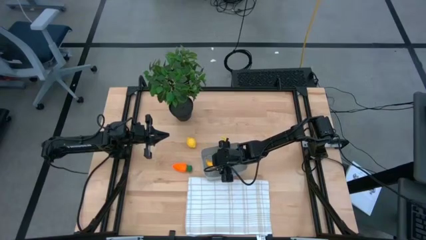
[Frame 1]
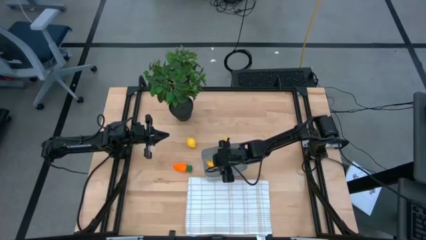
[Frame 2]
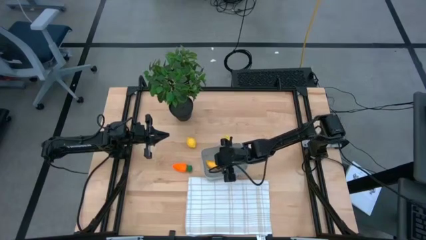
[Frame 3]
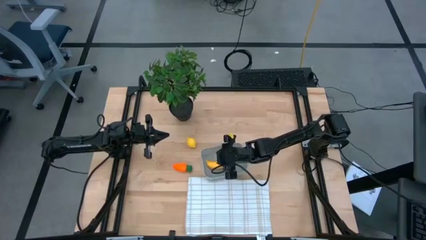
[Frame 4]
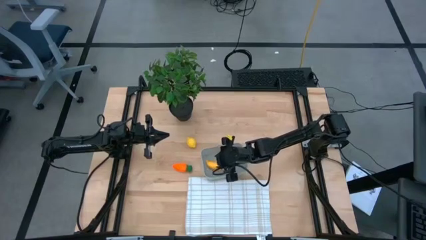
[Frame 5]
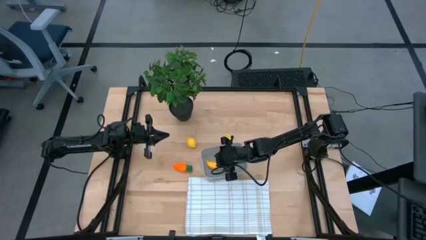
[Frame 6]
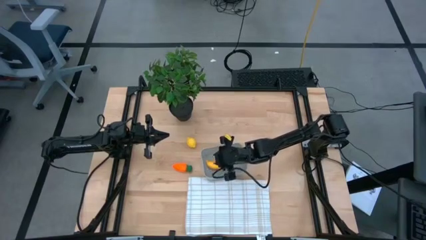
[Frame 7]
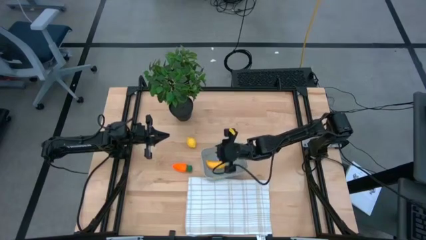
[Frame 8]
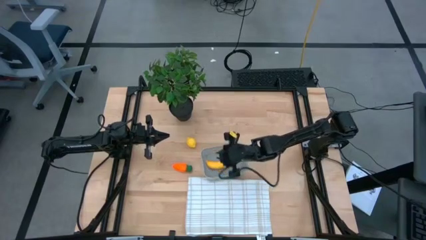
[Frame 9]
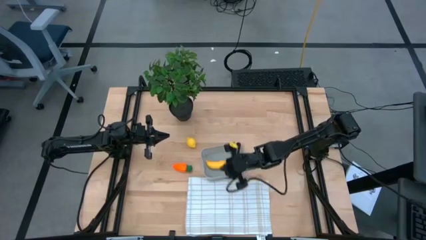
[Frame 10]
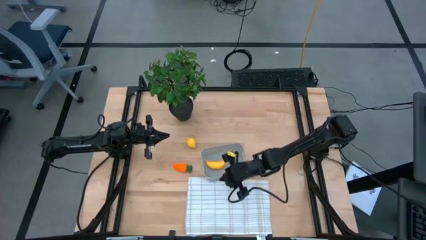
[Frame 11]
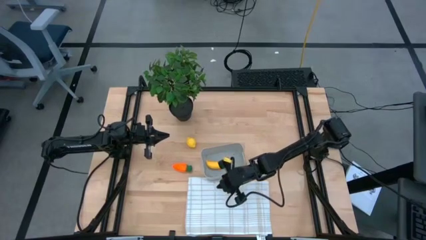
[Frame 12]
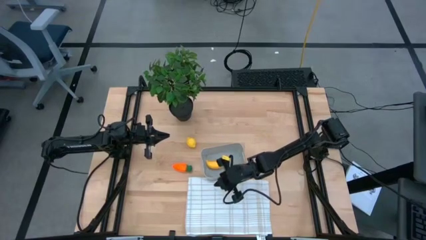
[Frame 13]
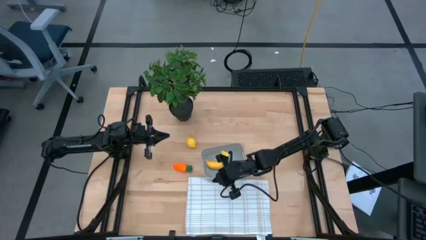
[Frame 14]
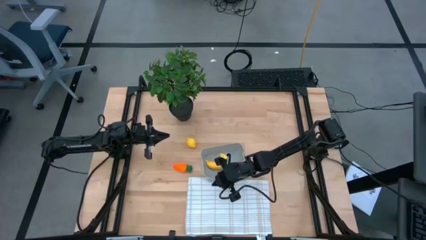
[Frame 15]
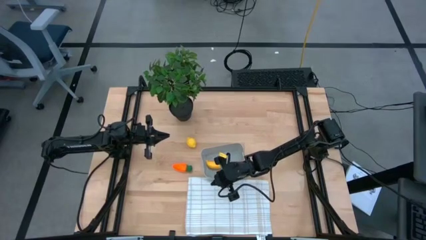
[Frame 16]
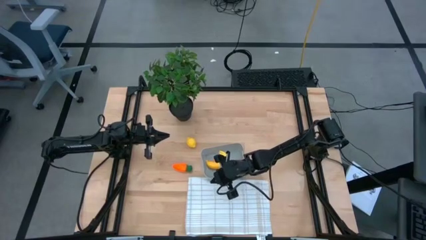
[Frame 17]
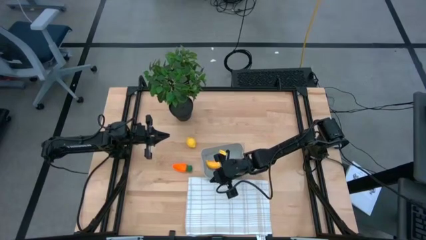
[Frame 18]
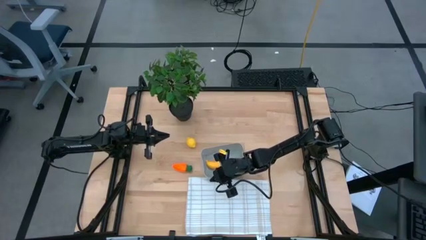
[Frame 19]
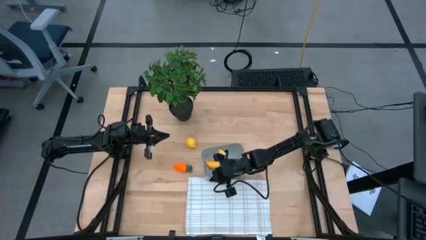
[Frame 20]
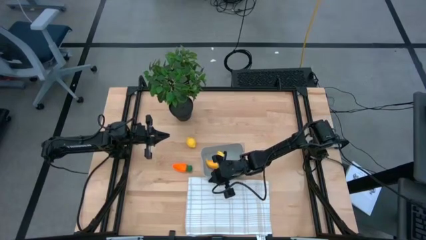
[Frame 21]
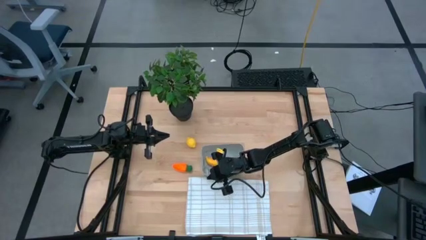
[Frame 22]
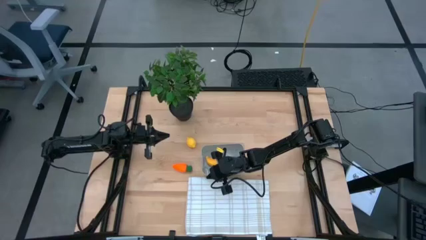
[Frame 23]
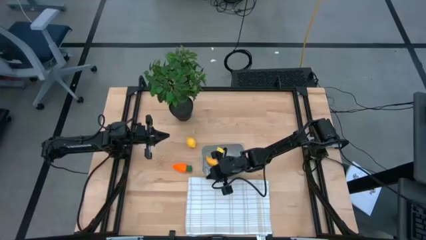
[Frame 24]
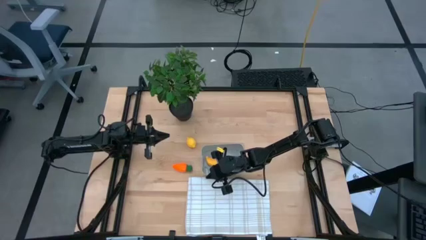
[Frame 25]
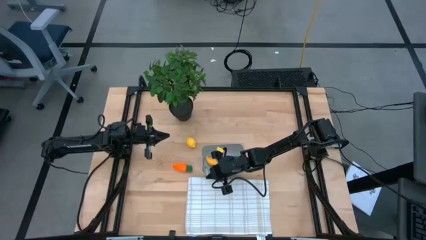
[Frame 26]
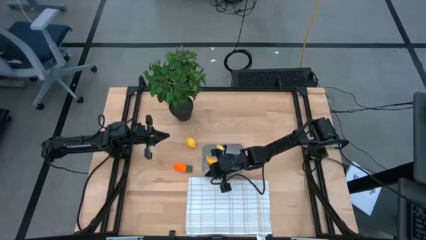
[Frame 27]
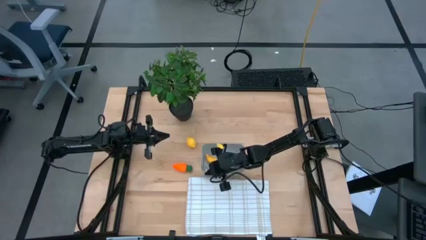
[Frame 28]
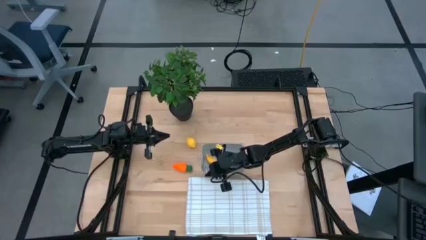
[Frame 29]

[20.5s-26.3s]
Task: Pick and placing Produce into tupperware
Adjust the gray basket

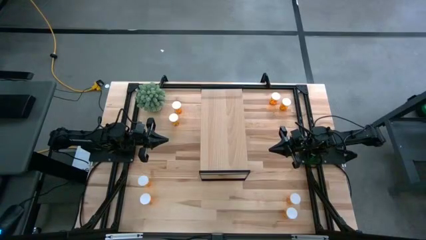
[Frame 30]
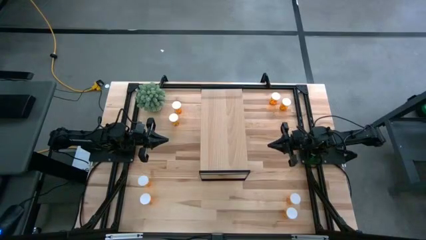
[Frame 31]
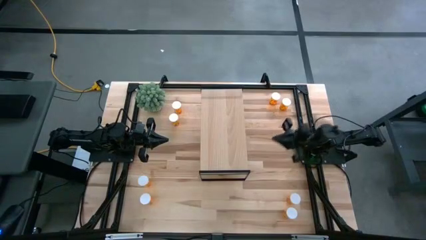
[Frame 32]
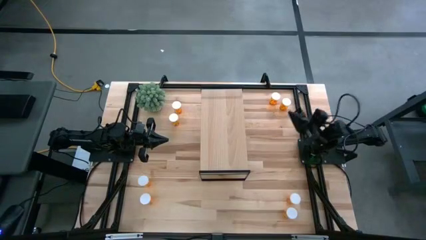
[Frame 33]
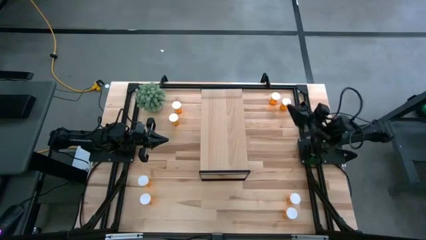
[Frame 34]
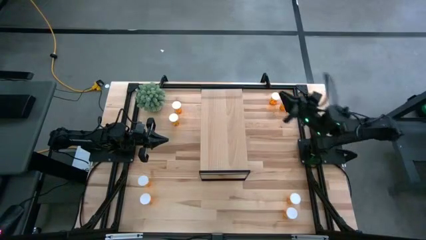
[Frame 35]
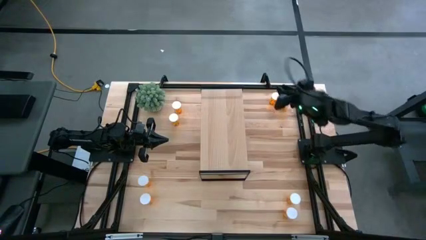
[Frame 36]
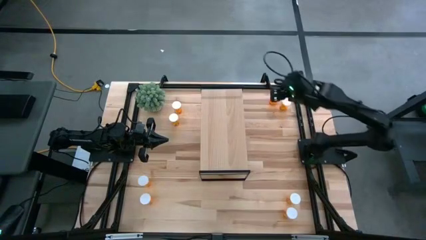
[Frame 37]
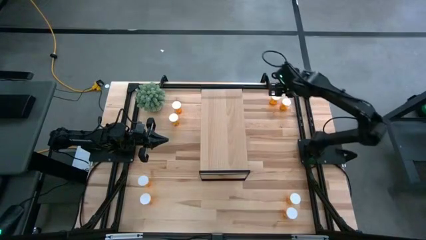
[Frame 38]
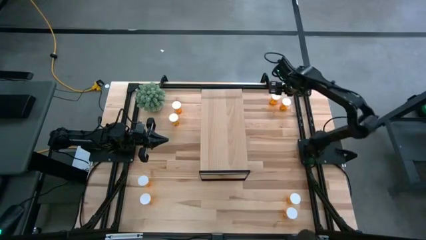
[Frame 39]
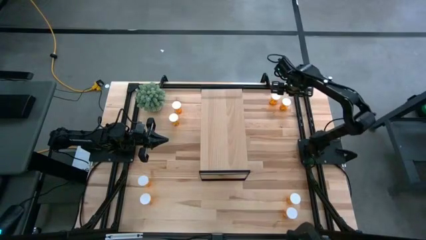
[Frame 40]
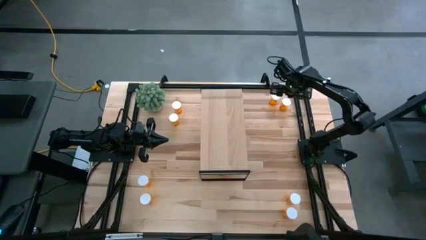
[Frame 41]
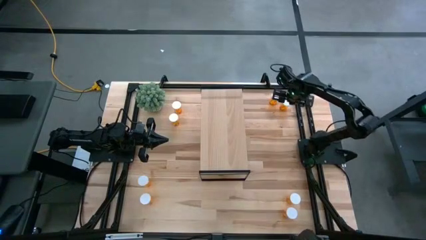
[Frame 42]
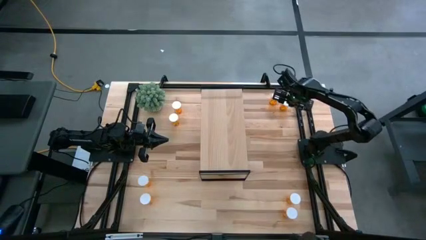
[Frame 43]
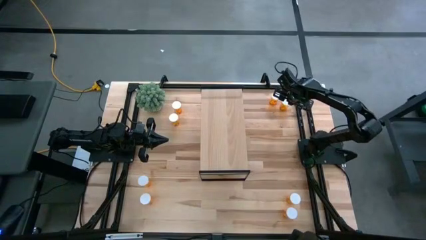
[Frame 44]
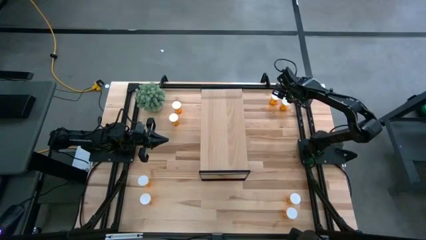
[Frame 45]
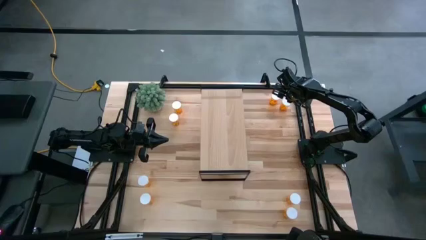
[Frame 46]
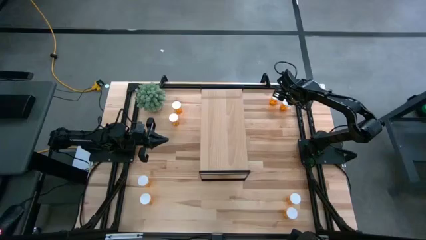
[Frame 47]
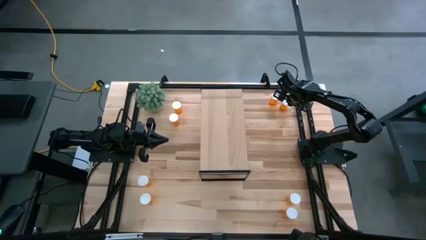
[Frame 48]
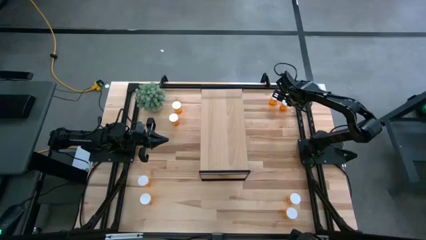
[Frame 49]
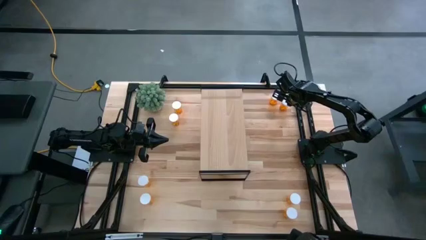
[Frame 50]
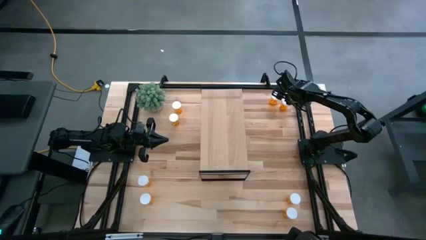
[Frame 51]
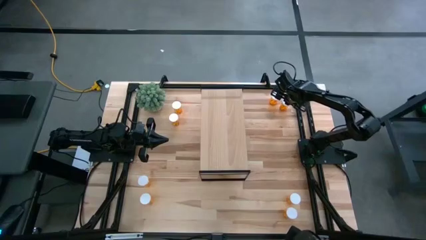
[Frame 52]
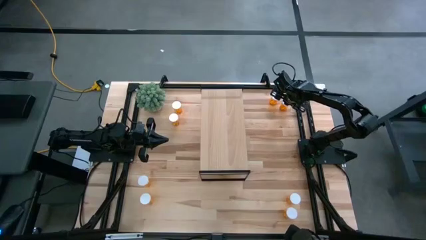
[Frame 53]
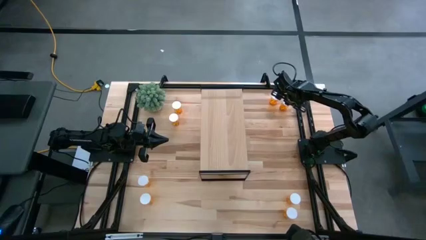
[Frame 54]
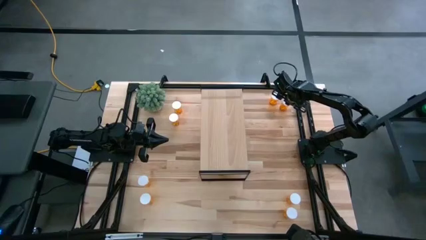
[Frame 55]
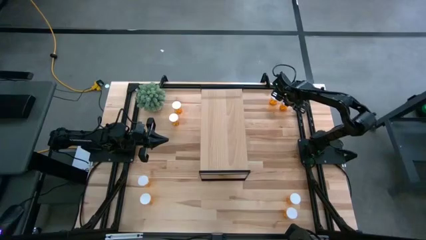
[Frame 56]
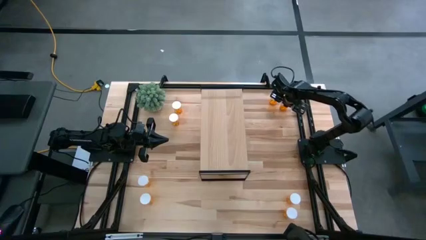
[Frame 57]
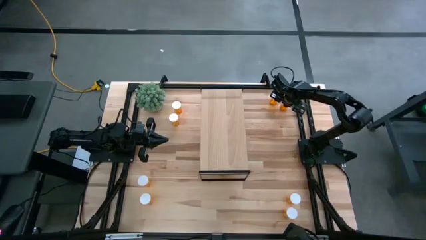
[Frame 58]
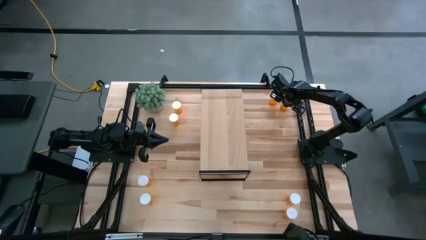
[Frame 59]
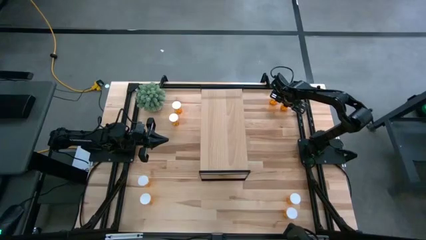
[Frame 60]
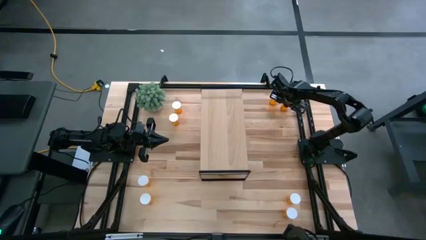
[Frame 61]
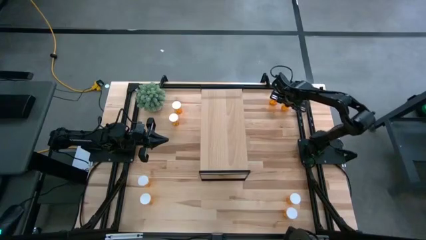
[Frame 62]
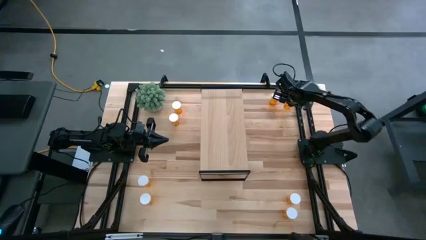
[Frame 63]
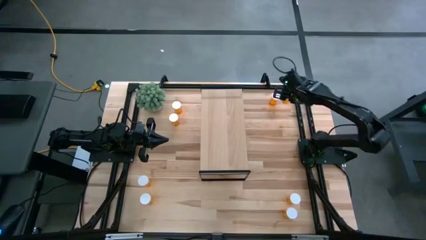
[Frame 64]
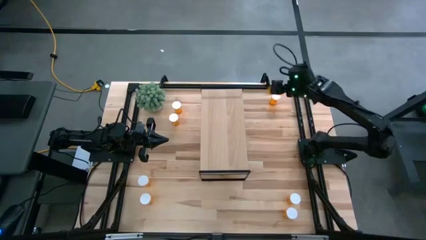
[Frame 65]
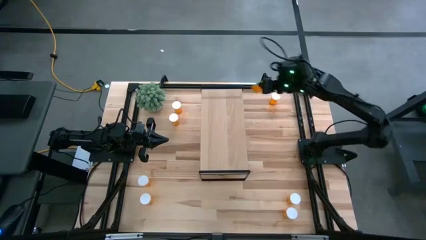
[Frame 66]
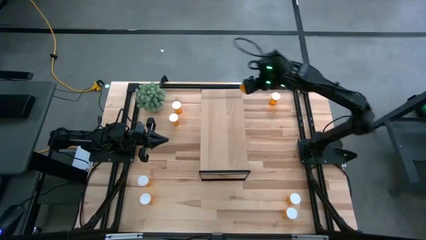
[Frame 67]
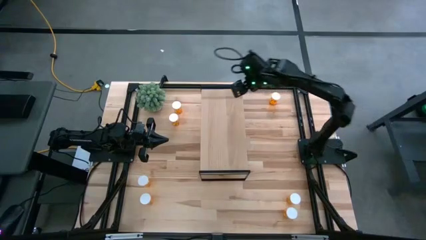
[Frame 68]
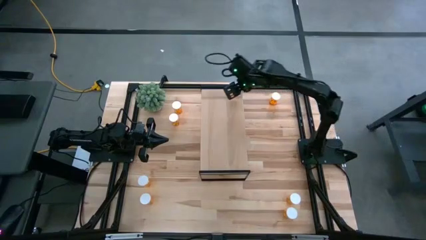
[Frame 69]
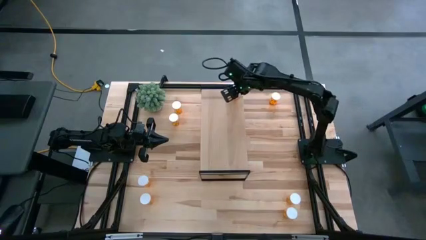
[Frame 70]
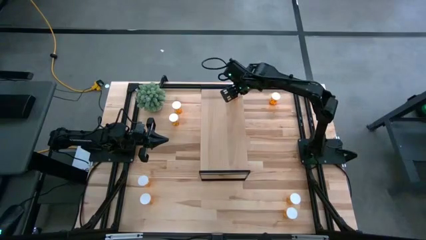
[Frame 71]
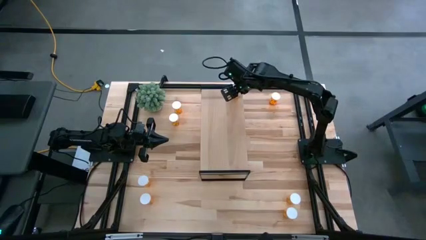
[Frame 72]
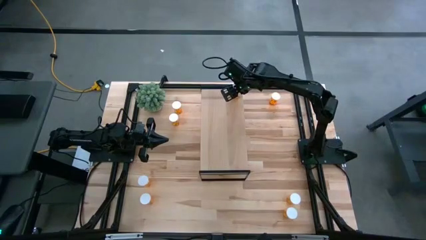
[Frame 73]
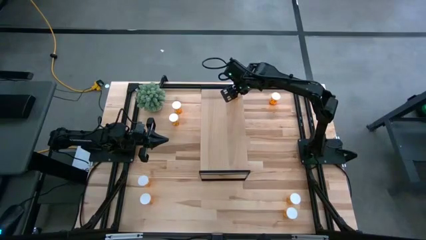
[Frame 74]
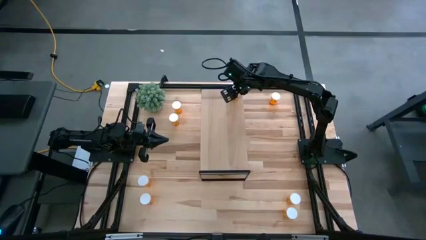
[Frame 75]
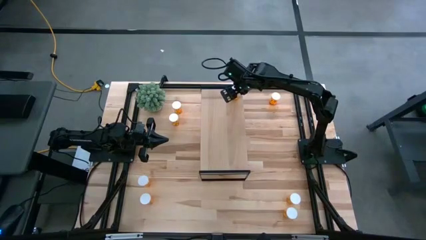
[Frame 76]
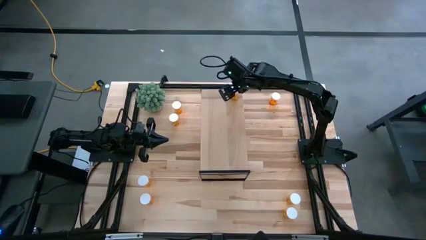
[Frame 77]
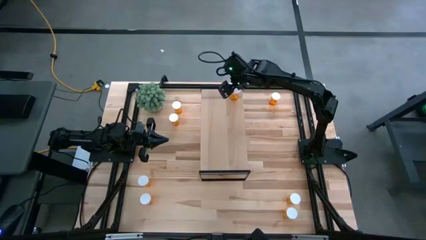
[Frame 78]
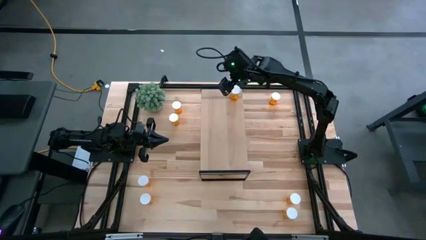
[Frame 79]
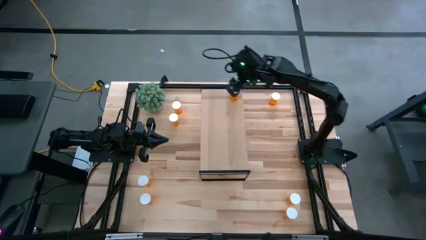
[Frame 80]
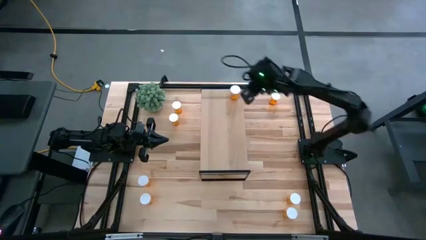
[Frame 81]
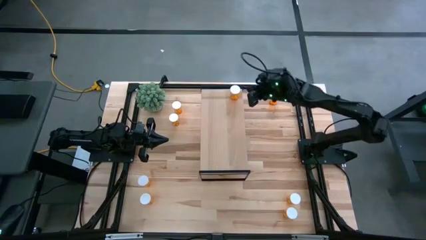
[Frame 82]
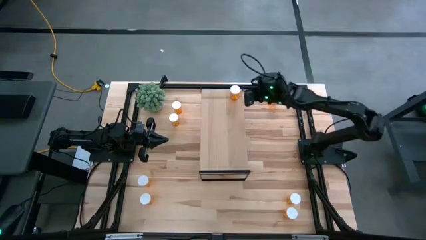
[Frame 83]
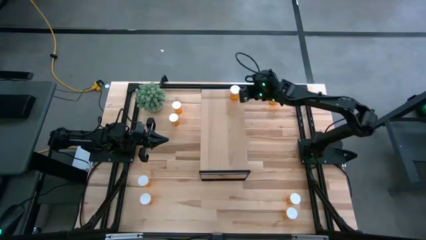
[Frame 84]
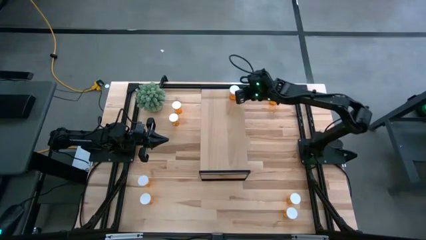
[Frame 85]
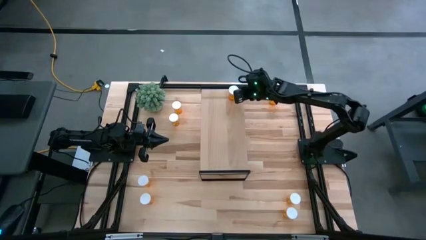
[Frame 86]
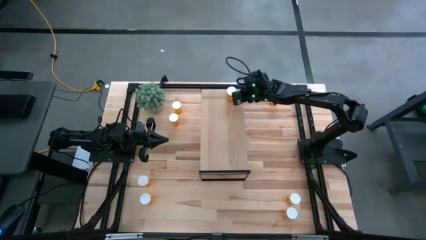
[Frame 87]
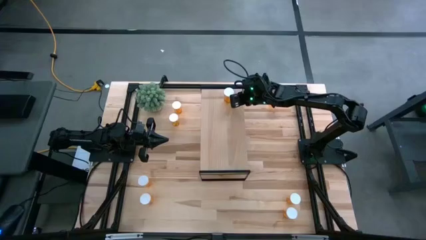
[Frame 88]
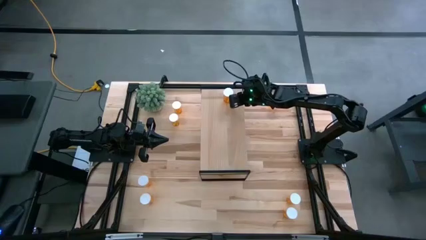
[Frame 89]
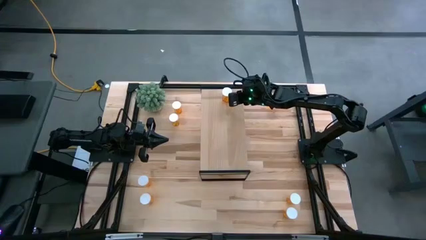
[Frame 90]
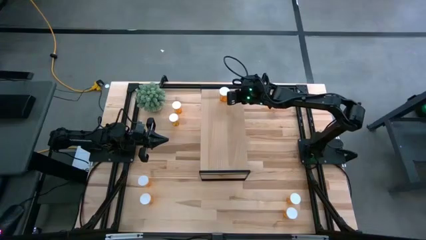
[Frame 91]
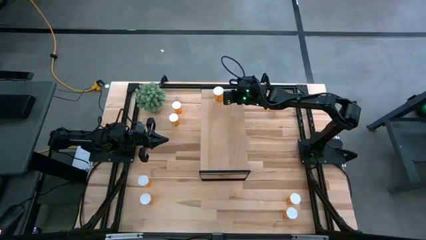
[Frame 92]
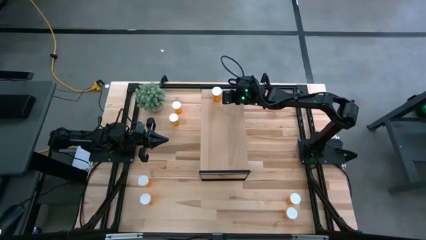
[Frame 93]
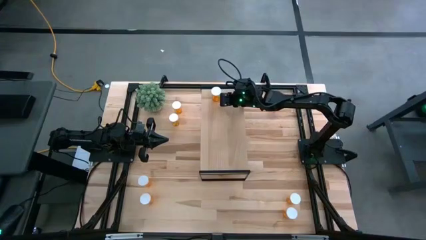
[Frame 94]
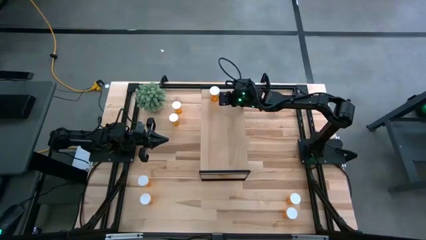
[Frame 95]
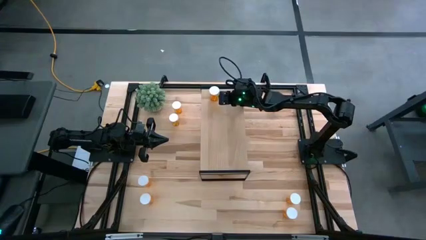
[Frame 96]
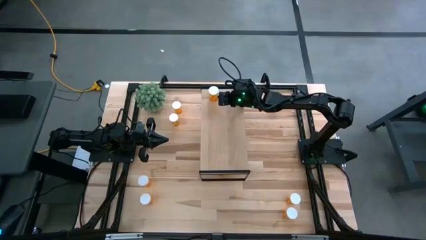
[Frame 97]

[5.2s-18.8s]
Task: Pick and place medicine bottles onto shelf by color
Put the orange pill bottle on the shelf
